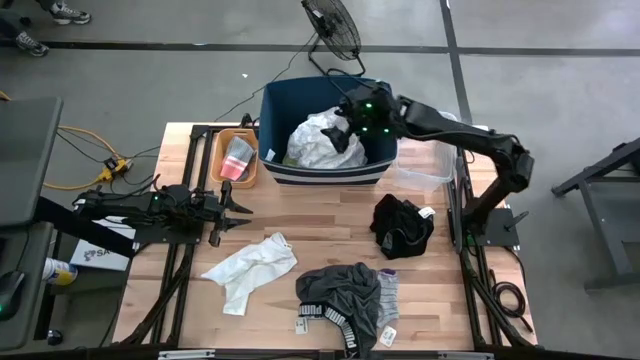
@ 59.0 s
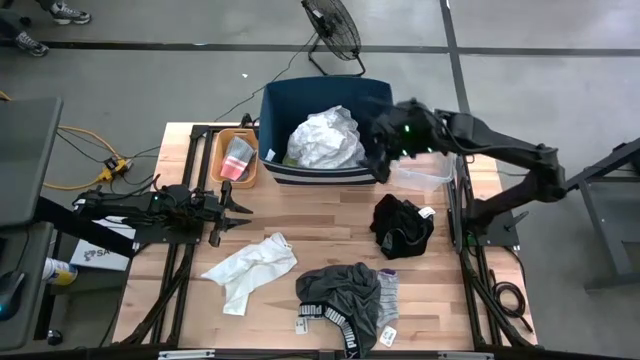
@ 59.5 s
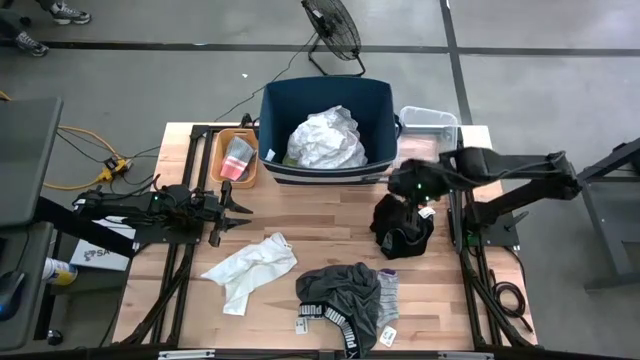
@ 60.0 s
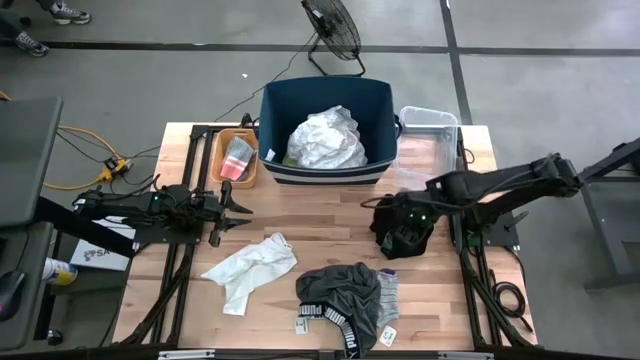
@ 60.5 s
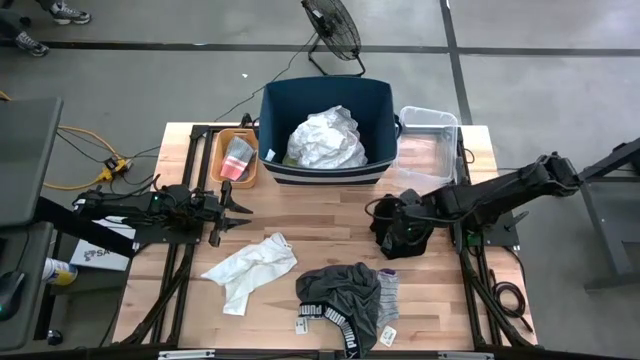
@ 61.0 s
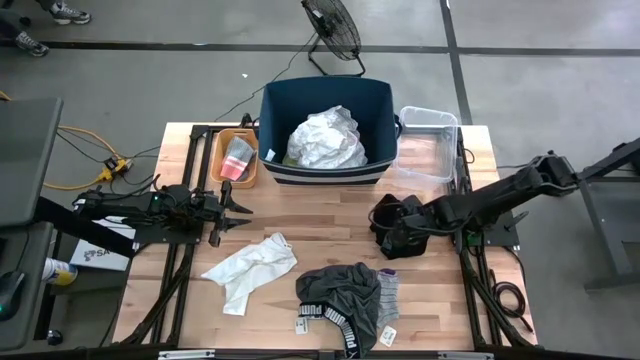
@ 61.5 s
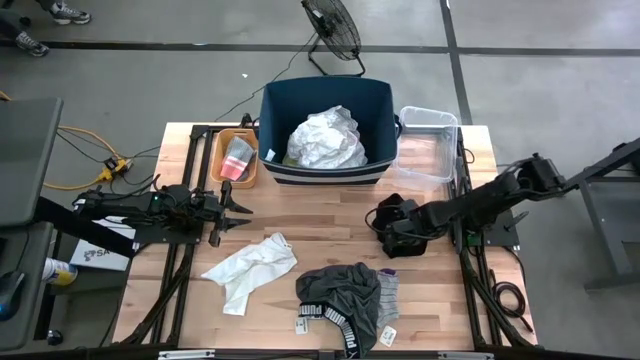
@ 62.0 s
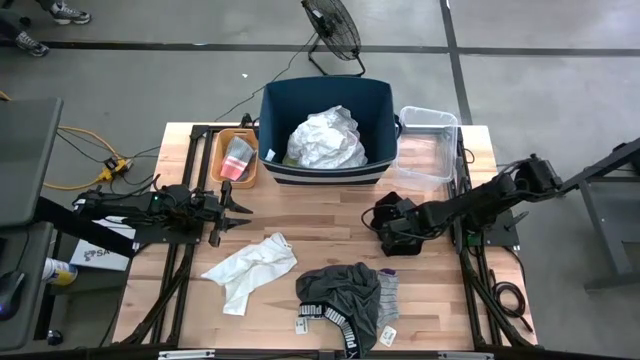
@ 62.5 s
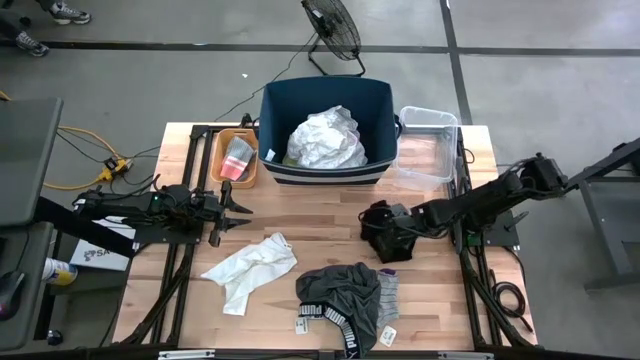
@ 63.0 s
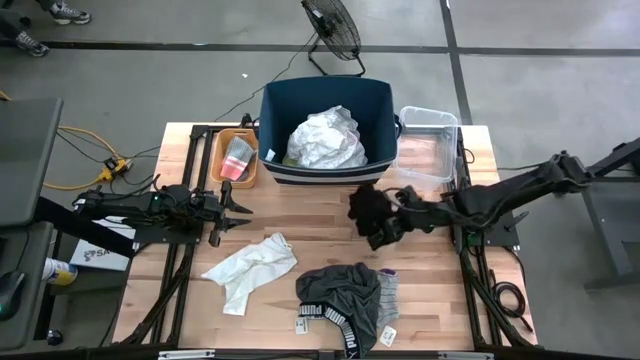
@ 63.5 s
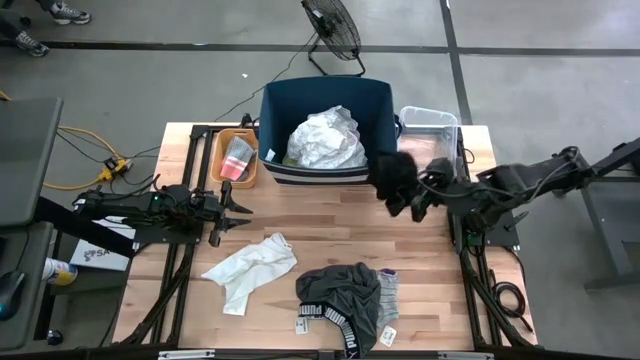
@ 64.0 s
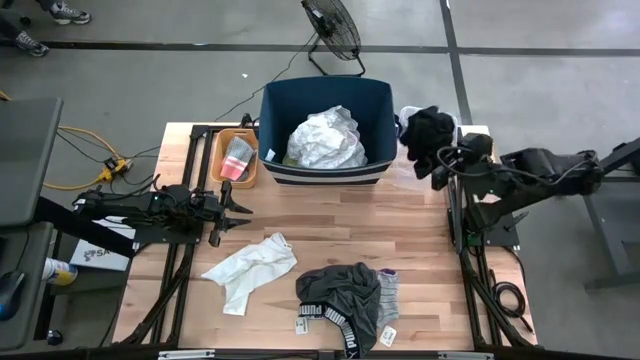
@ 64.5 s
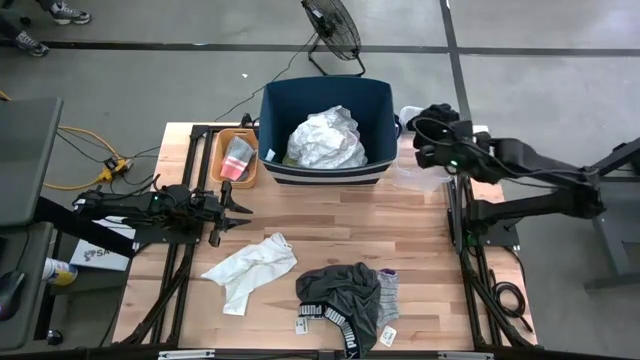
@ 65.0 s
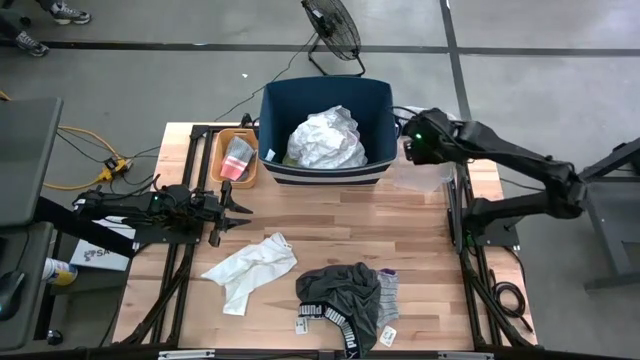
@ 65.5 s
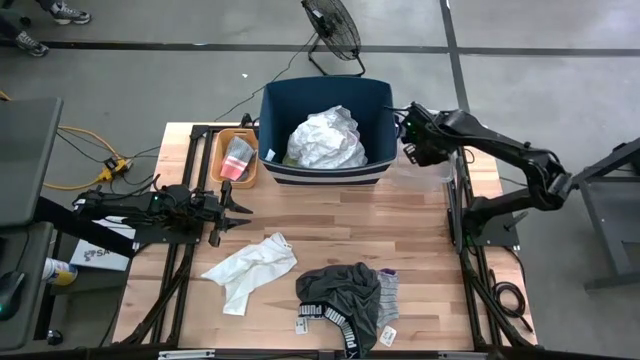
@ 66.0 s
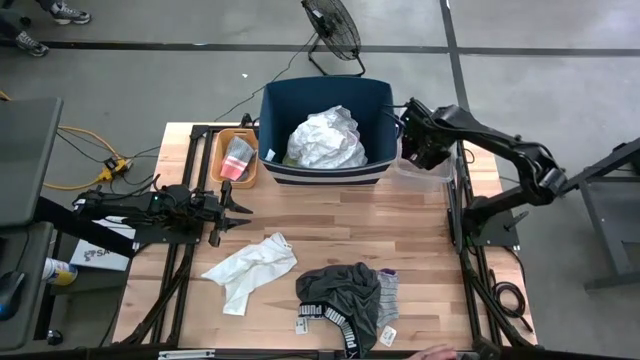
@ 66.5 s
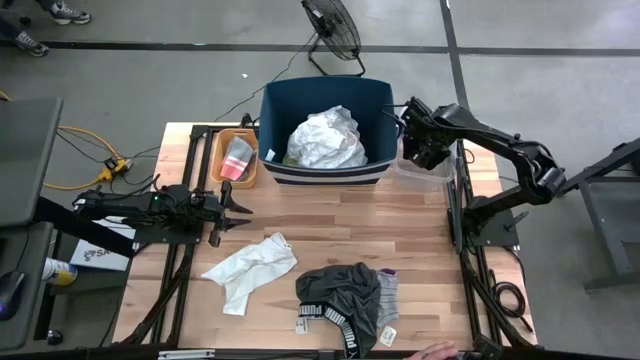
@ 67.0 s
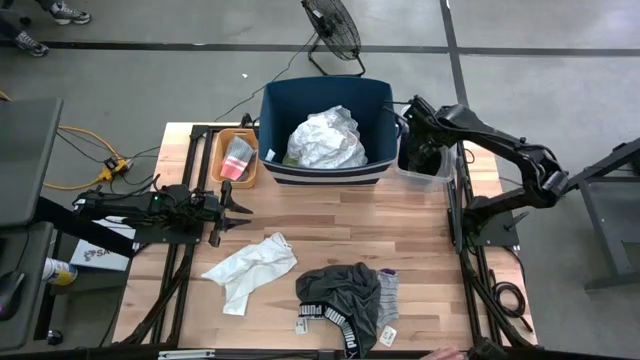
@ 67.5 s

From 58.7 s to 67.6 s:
Task: Pick & Place Cloths
Put the black underwear into the transparent bin
